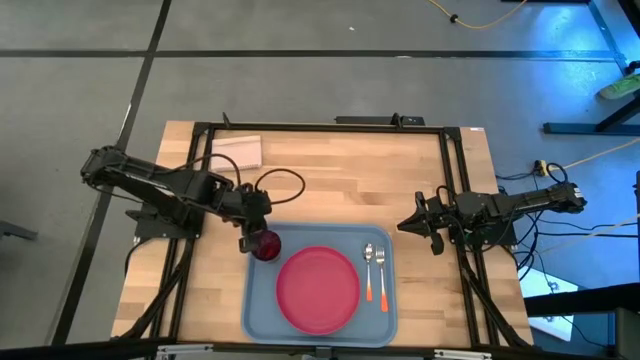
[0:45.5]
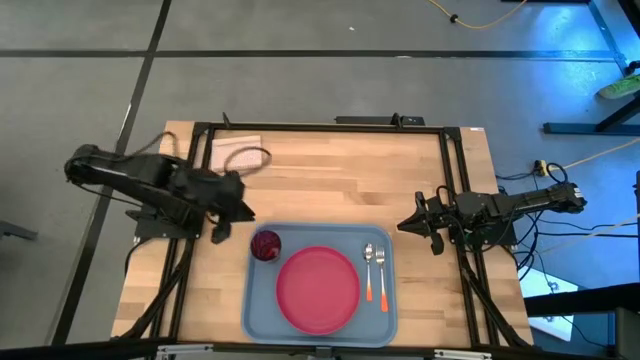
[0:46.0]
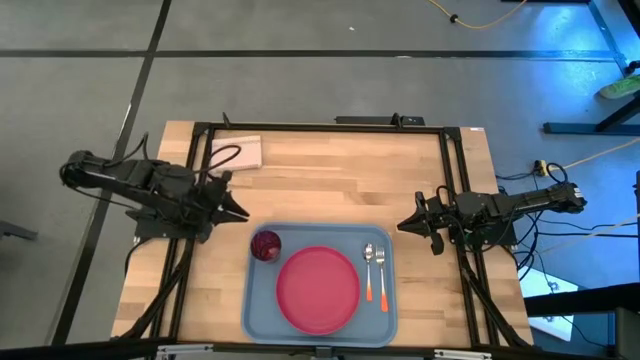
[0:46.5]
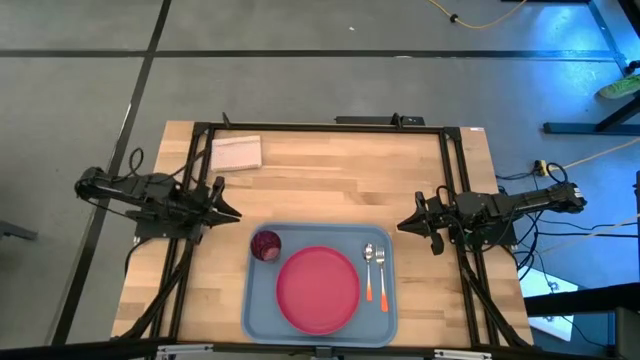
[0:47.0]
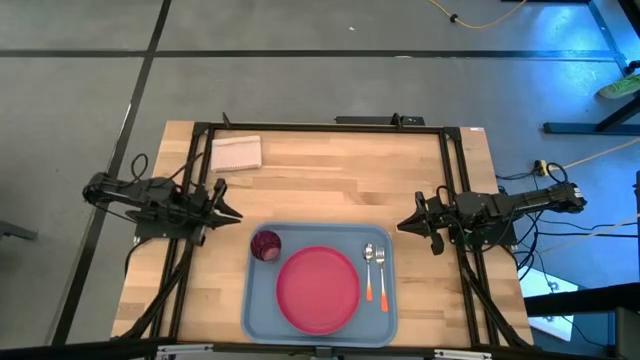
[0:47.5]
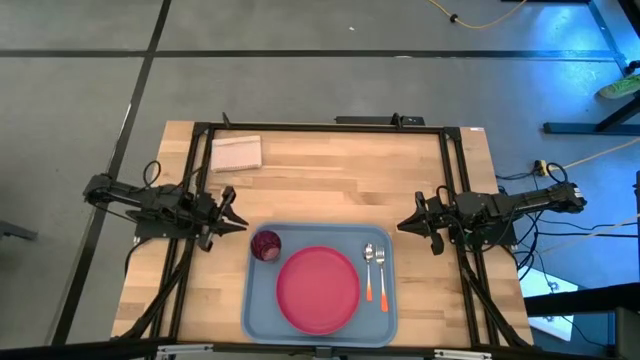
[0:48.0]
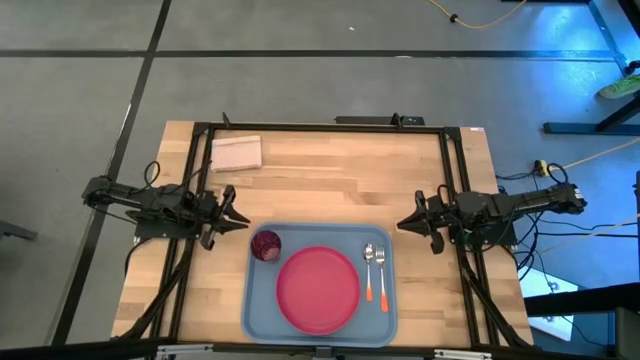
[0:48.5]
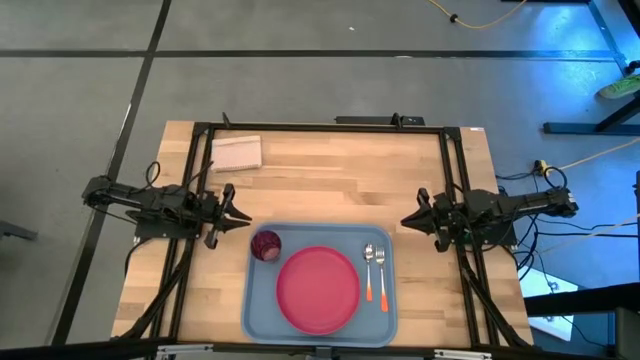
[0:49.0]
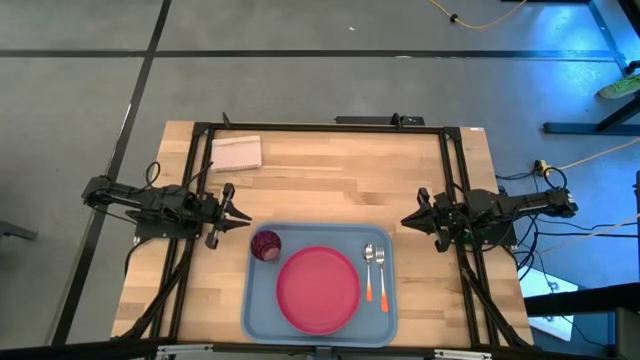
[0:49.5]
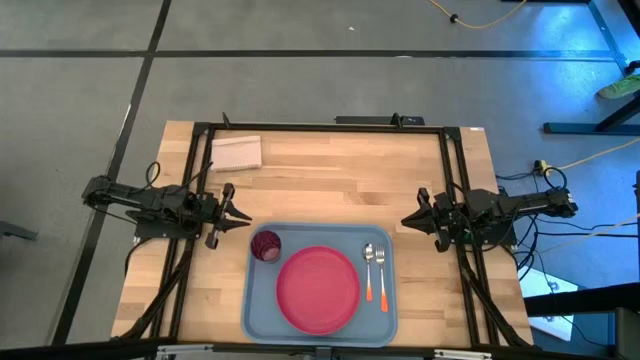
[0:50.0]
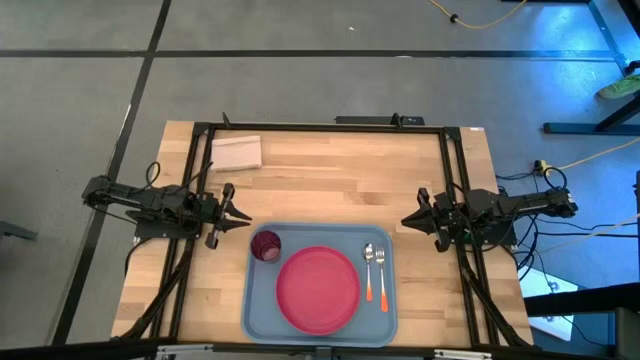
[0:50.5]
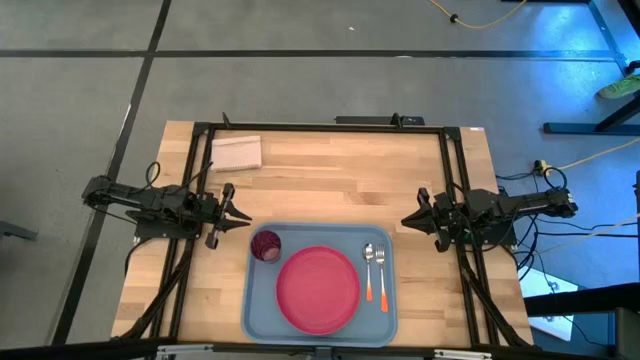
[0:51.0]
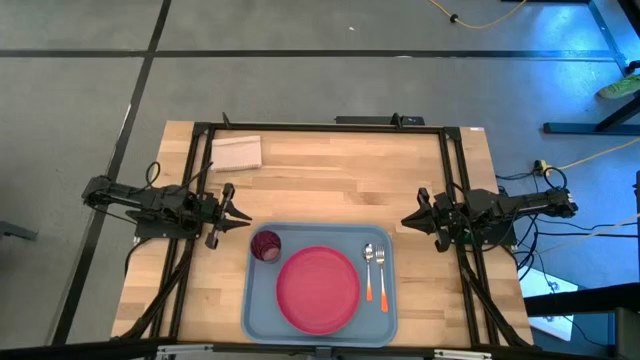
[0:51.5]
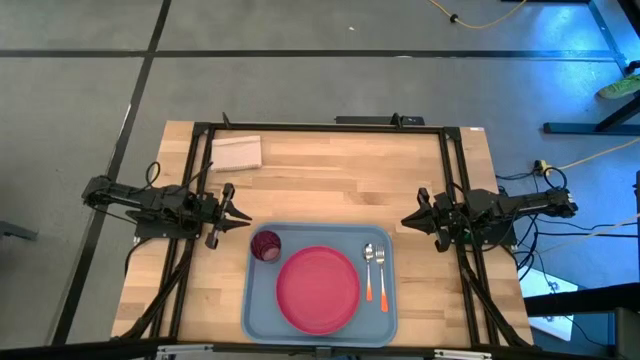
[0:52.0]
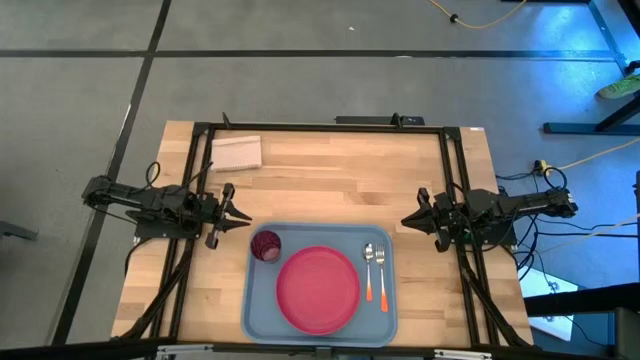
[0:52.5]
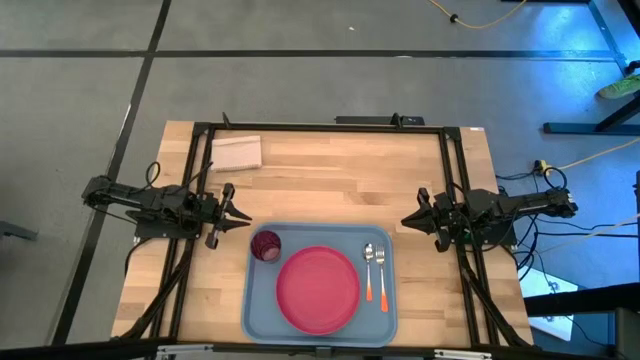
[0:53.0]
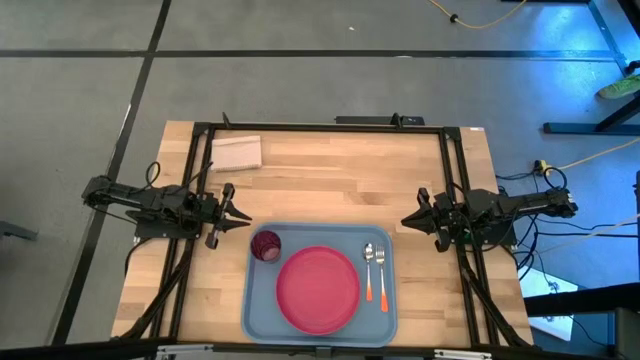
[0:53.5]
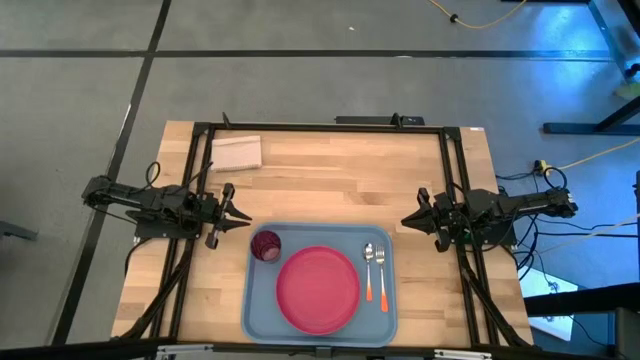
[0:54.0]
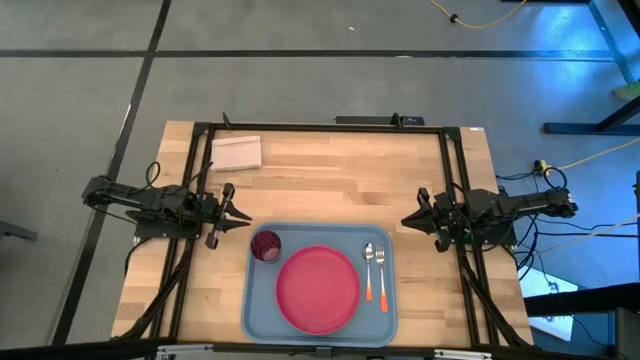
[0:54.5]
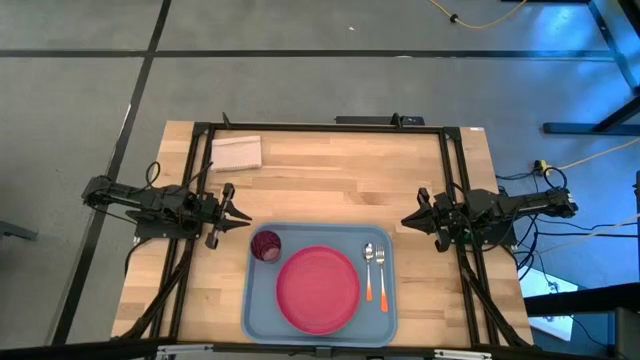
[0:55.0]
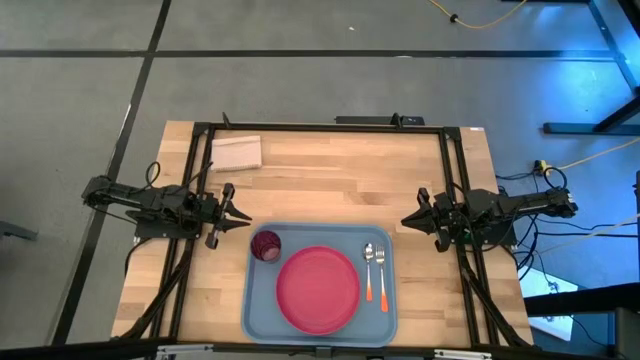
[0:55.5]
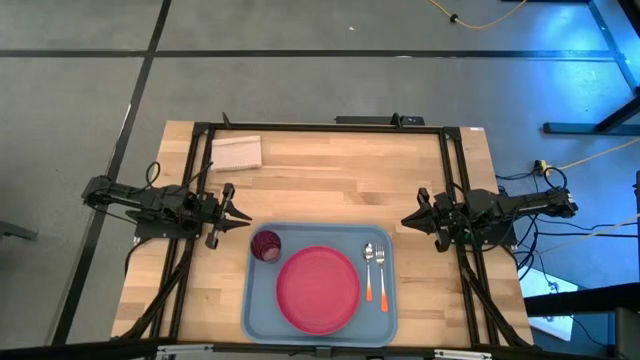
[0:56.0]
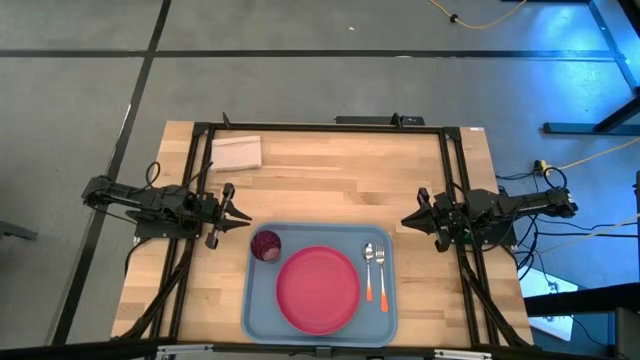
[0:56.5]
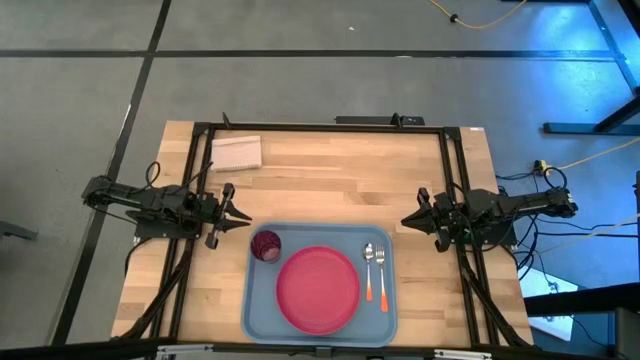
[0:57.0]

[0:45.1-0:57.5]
Task: Pick and place plate/cup/fork/spoon on tray
Return to Home Position

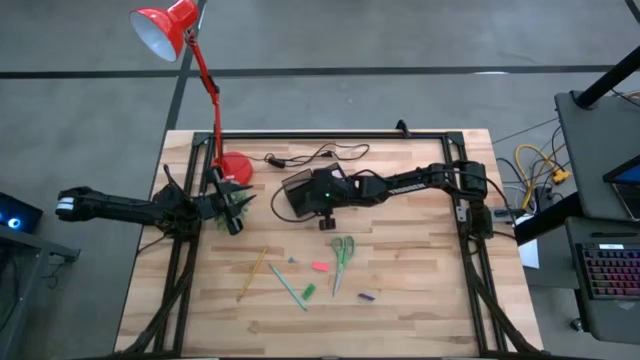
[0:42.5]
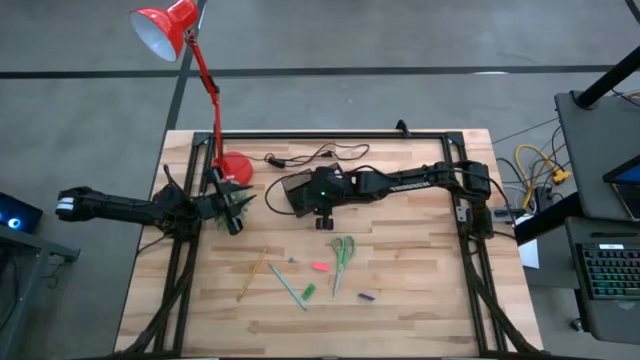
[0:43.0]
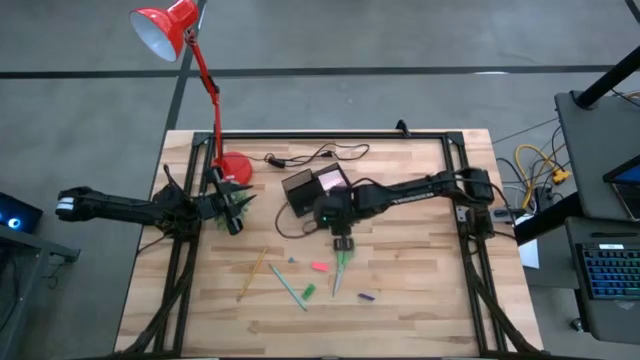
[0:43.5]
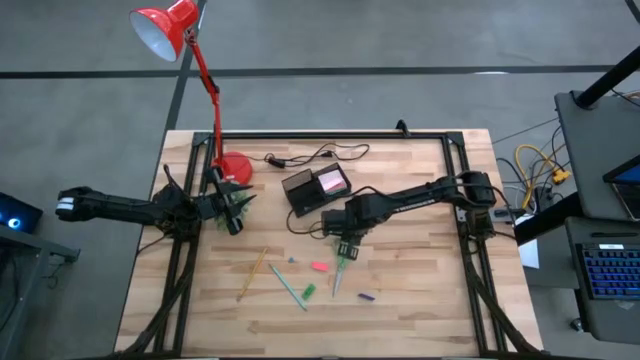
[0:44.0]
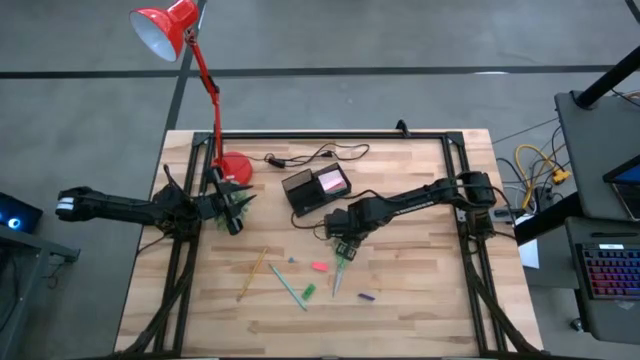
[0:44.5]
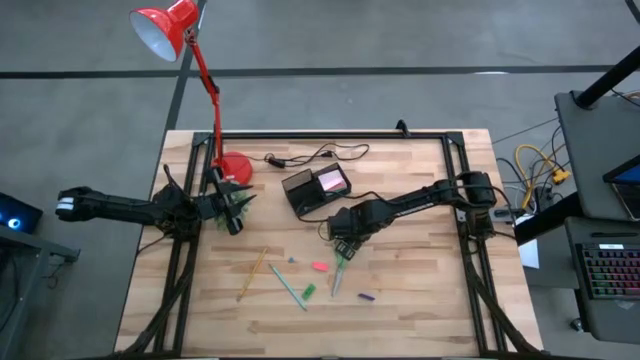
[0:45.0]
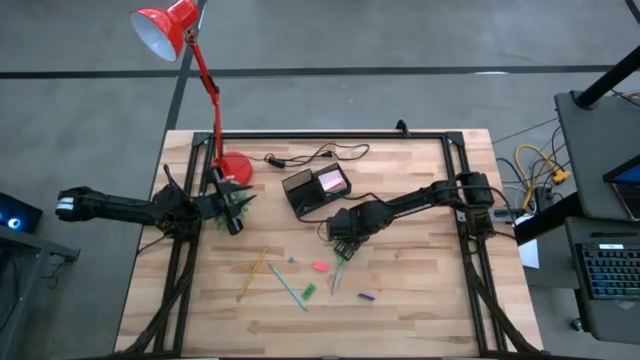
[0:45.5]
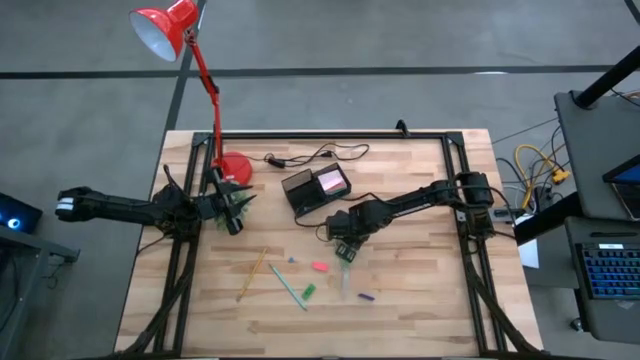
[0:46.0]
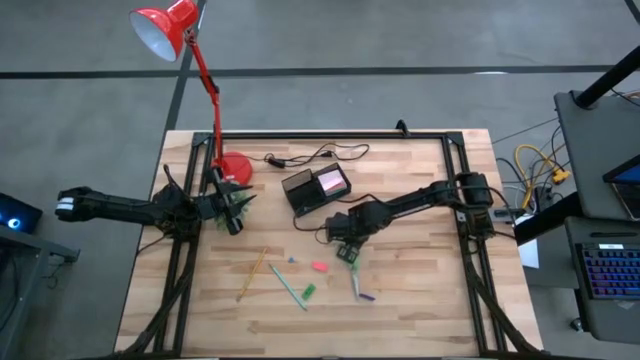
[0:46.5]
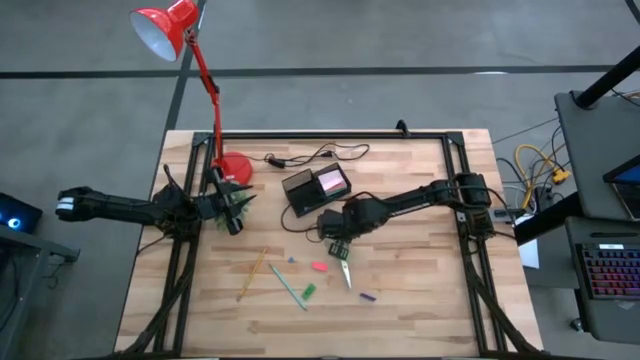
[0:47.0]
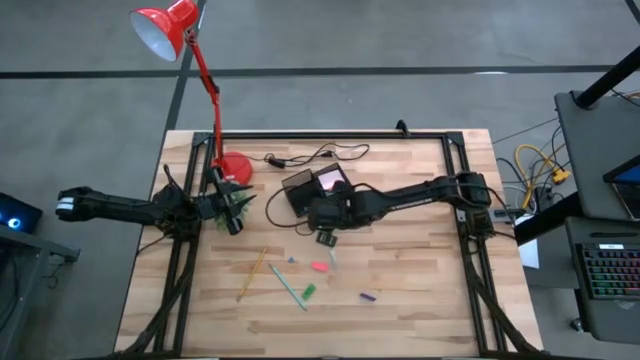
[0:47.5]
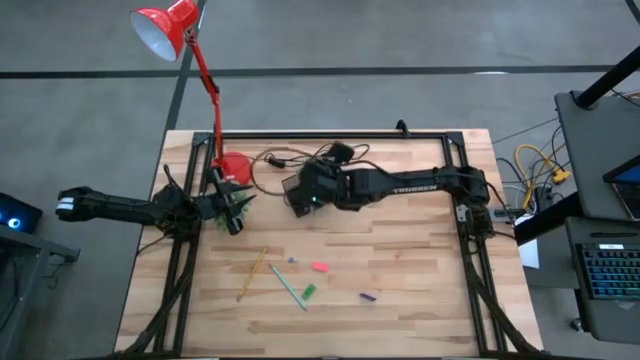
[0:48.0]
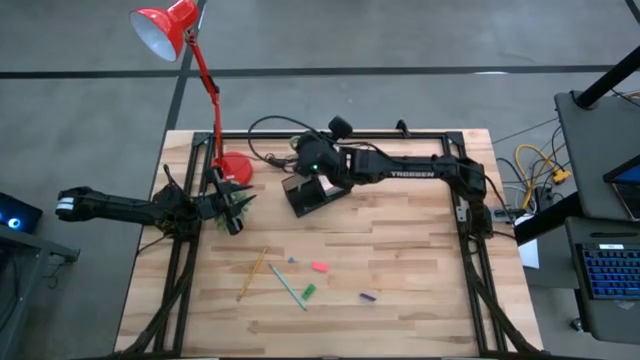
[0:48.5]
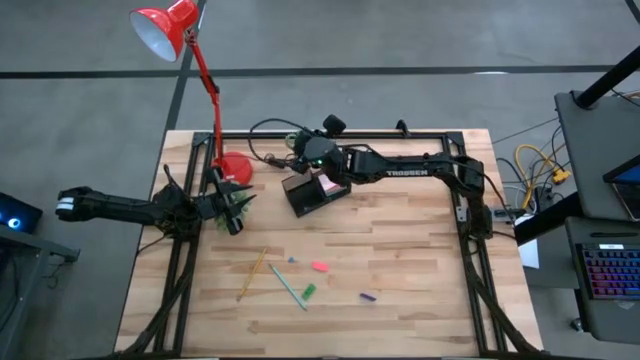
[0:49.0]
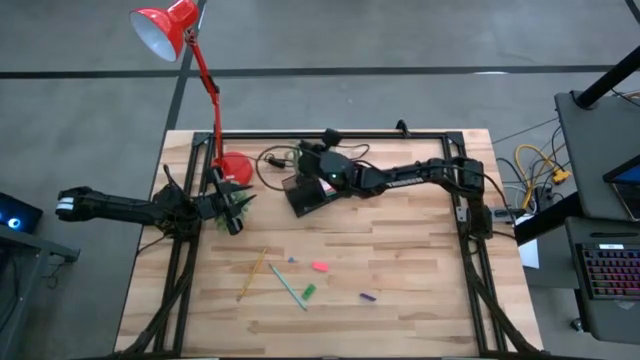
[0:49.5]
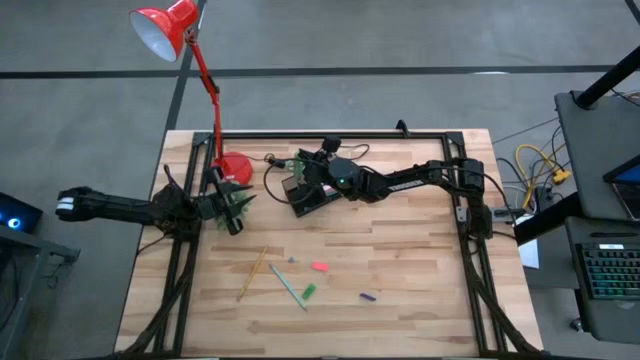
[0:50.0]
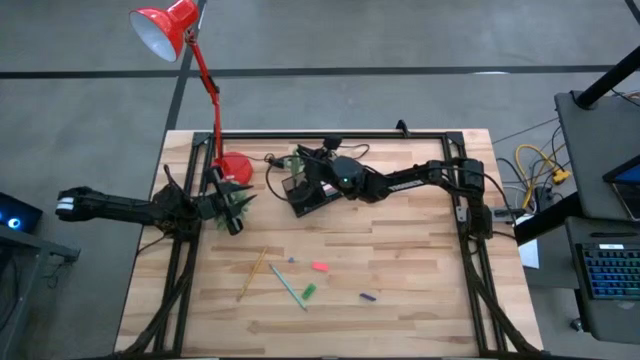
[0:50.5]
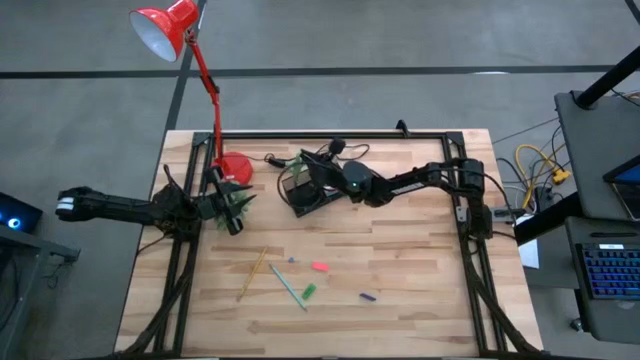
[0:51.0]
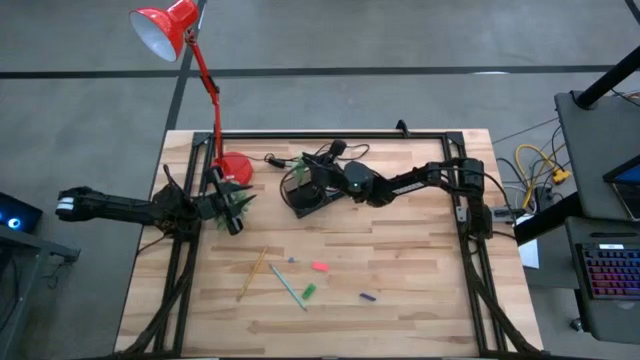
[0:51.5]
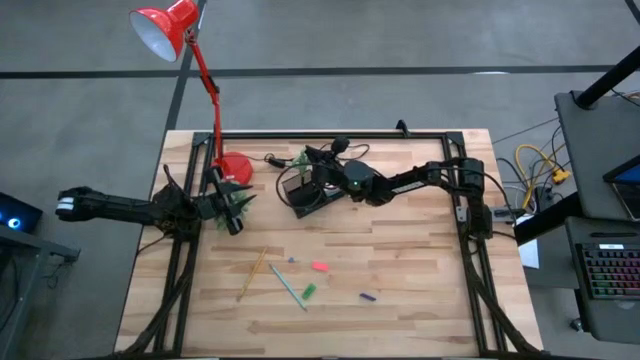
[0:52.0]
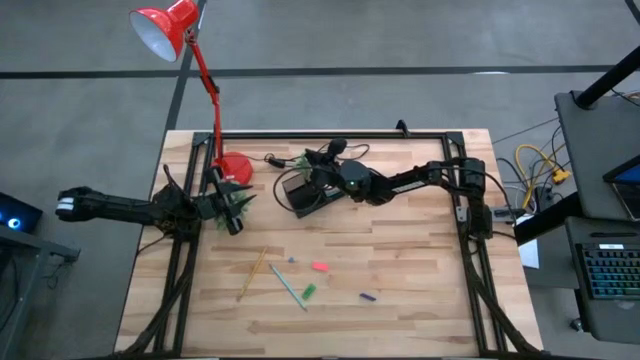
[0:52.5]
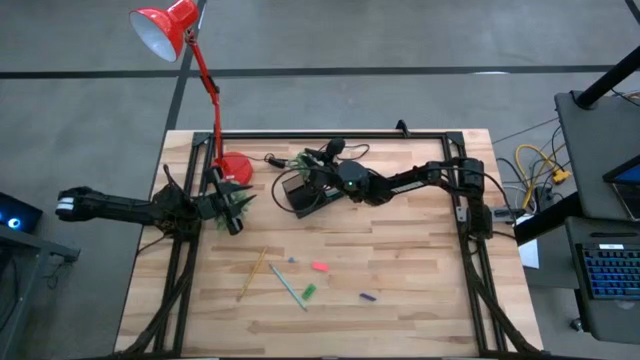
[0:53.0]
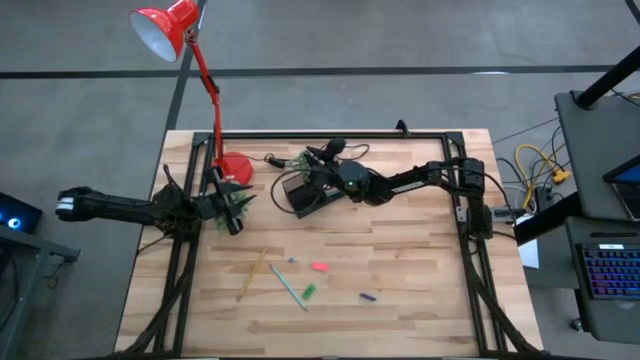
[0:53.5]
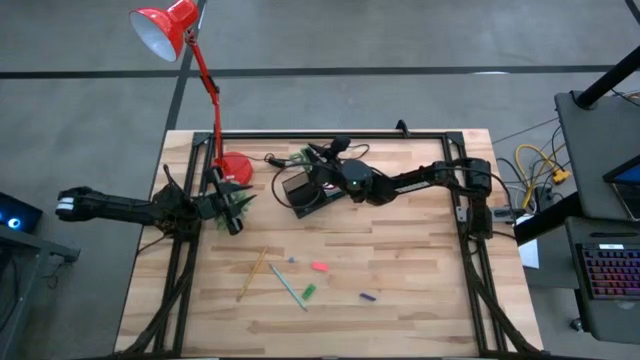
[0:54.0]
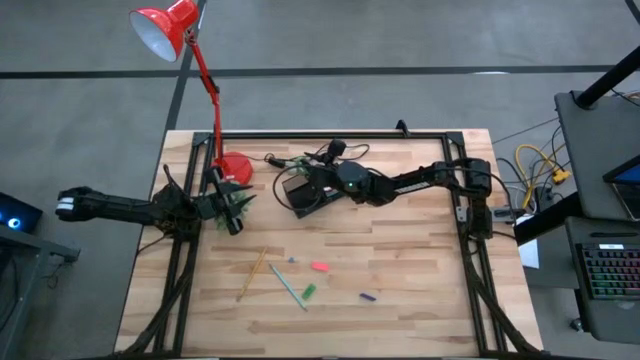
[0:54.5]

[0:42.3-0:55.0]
Task: Pick and place office supplies into organizer
Put the green scissors into the black desk organizer bin
